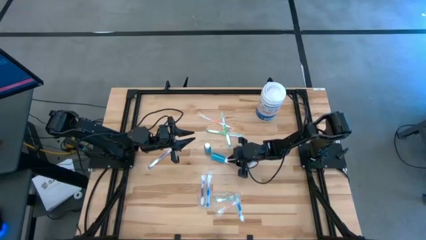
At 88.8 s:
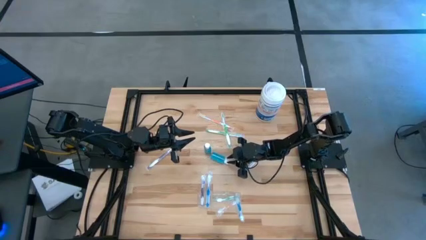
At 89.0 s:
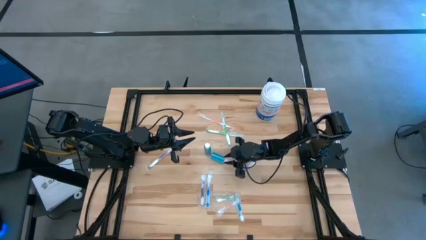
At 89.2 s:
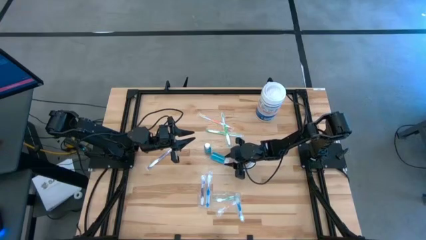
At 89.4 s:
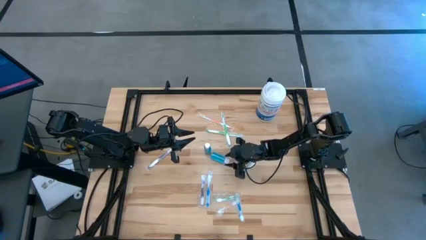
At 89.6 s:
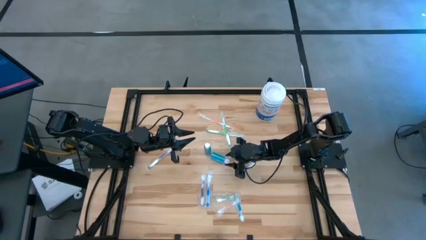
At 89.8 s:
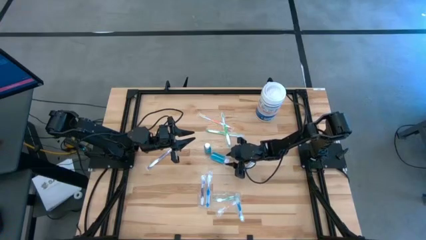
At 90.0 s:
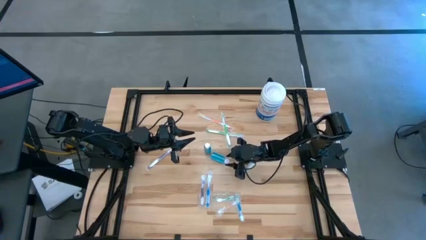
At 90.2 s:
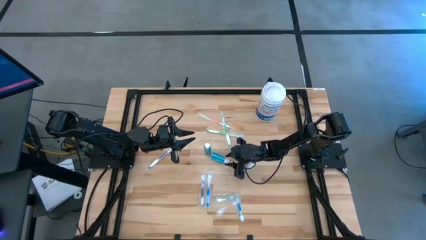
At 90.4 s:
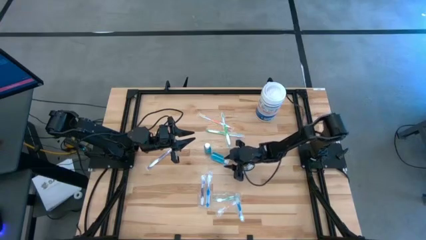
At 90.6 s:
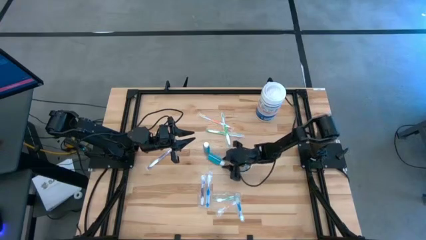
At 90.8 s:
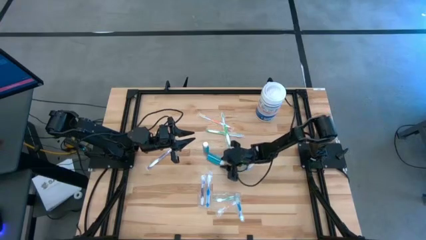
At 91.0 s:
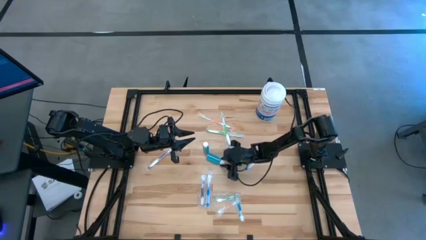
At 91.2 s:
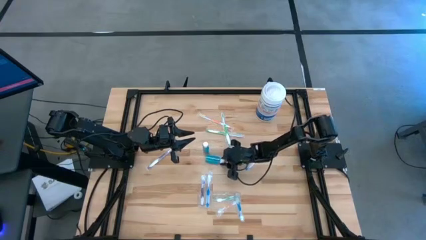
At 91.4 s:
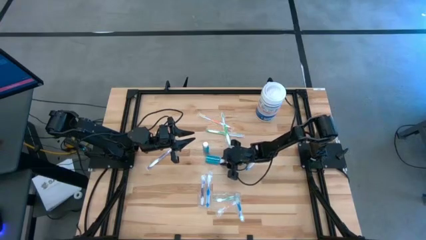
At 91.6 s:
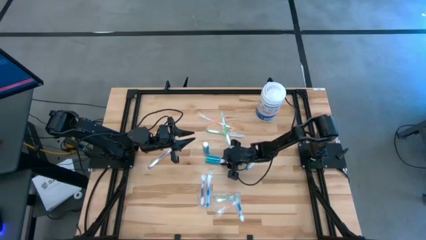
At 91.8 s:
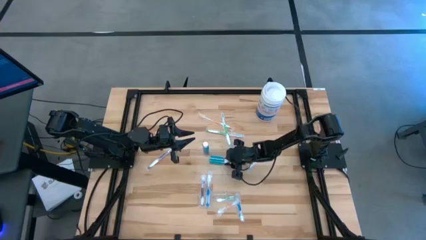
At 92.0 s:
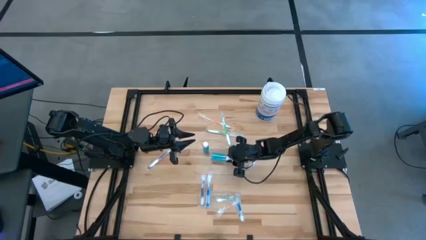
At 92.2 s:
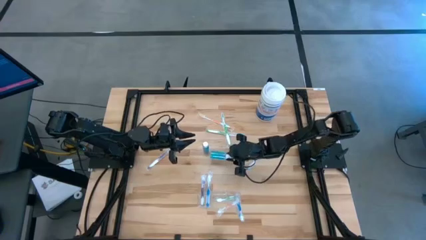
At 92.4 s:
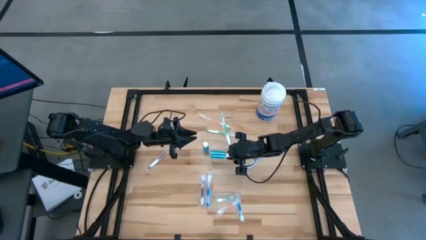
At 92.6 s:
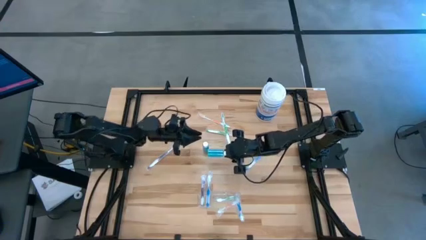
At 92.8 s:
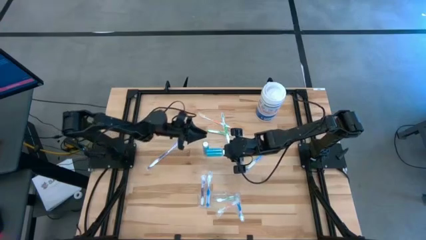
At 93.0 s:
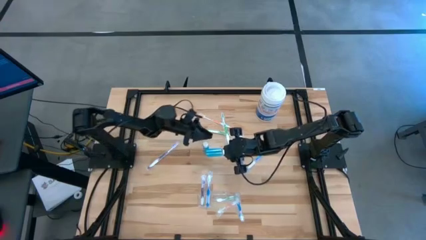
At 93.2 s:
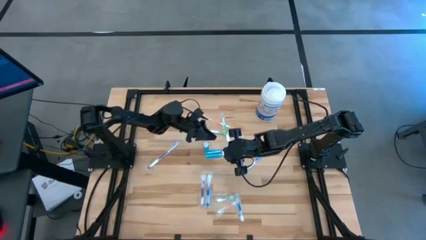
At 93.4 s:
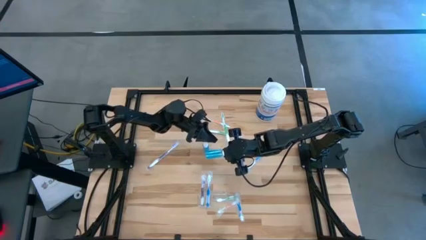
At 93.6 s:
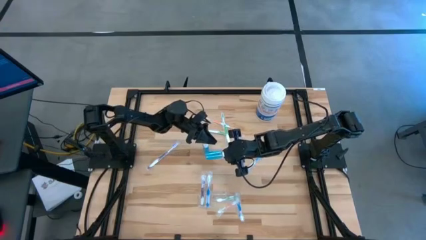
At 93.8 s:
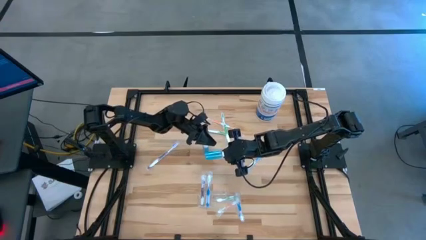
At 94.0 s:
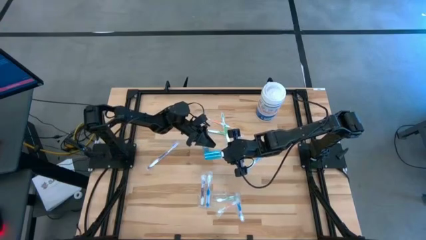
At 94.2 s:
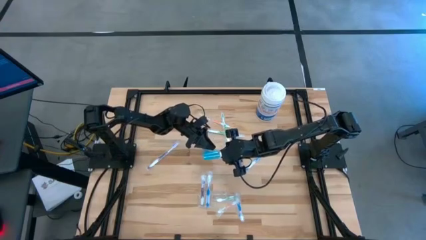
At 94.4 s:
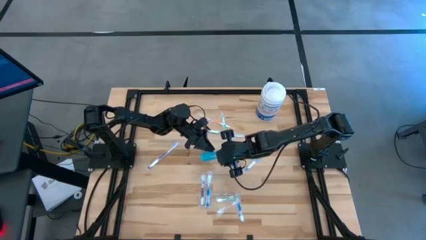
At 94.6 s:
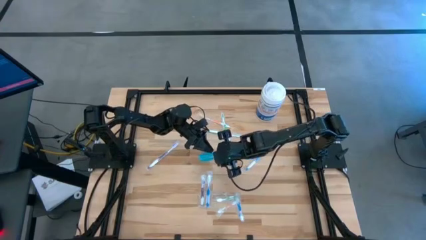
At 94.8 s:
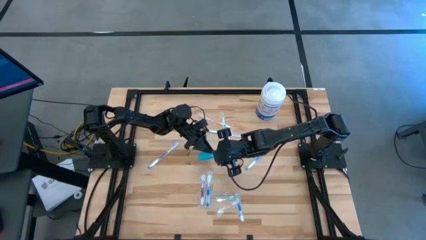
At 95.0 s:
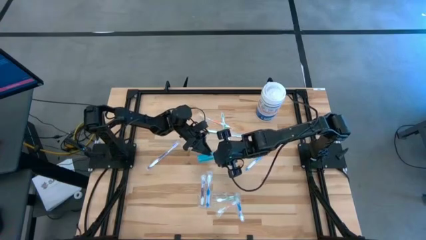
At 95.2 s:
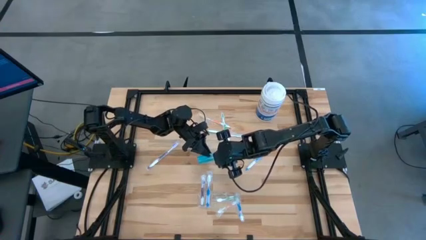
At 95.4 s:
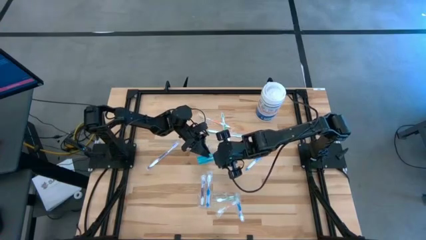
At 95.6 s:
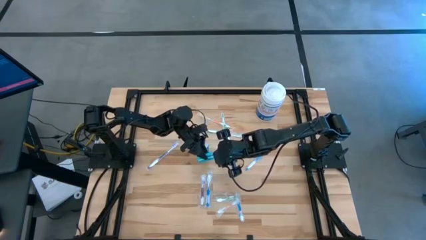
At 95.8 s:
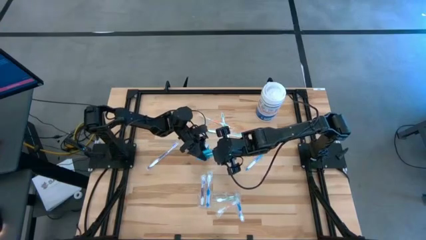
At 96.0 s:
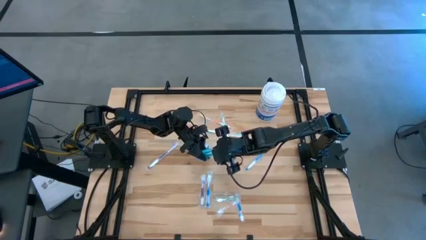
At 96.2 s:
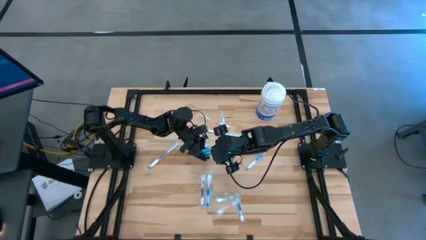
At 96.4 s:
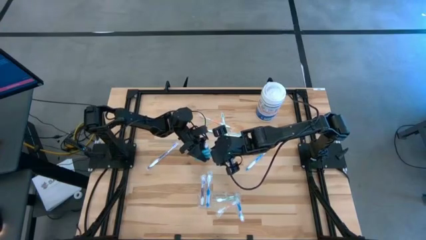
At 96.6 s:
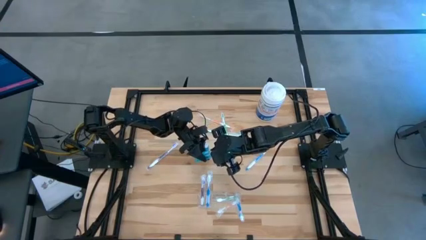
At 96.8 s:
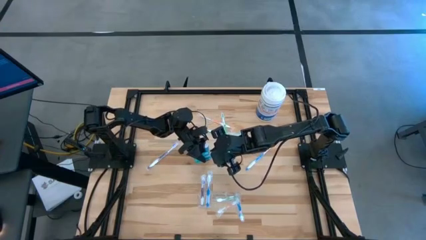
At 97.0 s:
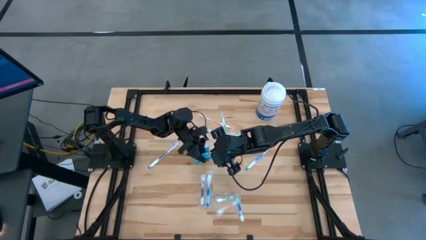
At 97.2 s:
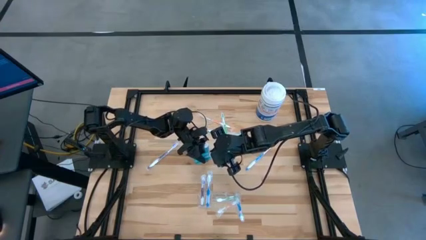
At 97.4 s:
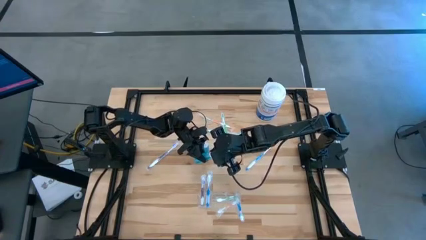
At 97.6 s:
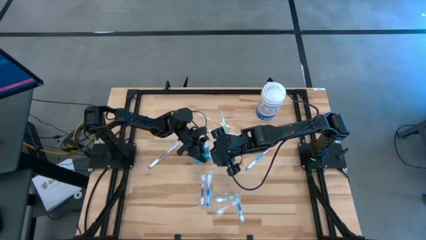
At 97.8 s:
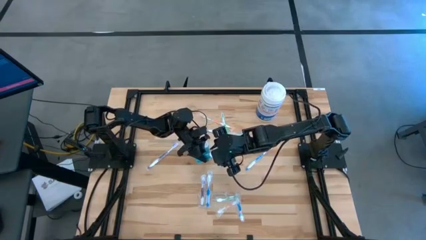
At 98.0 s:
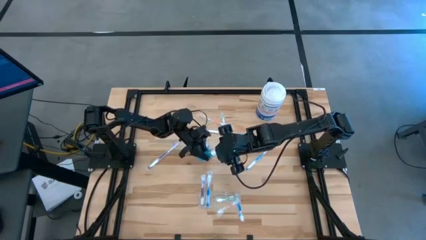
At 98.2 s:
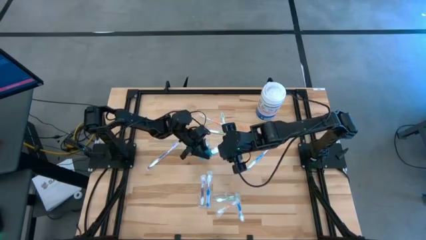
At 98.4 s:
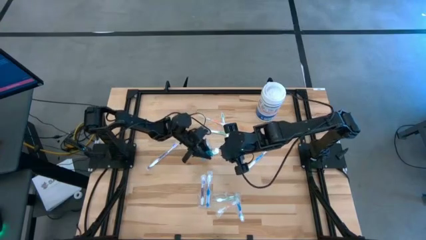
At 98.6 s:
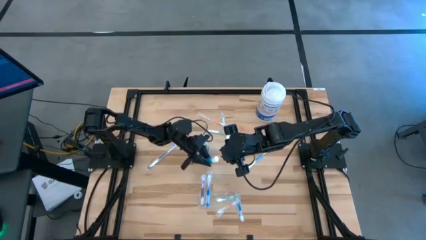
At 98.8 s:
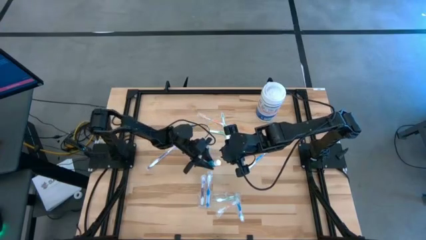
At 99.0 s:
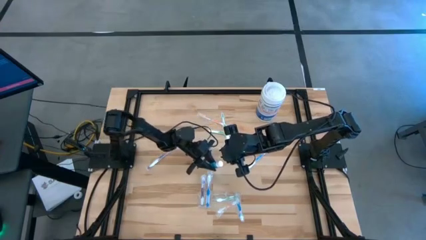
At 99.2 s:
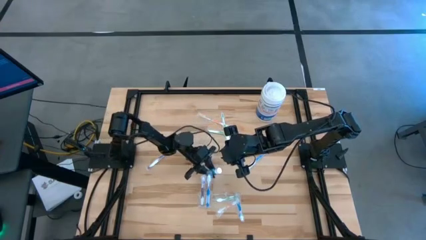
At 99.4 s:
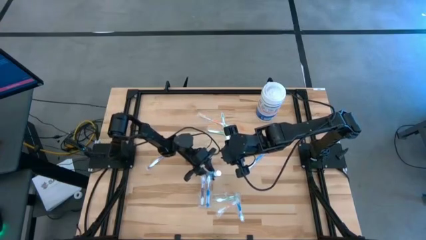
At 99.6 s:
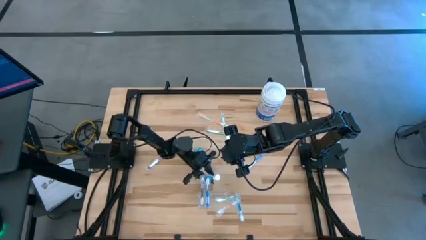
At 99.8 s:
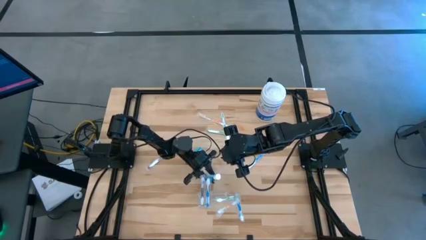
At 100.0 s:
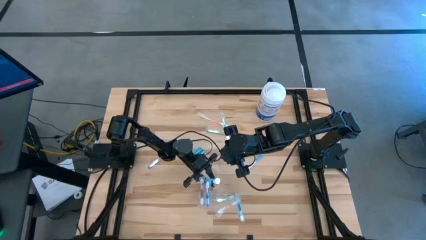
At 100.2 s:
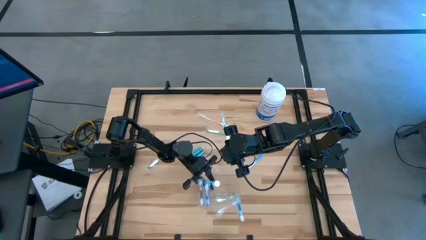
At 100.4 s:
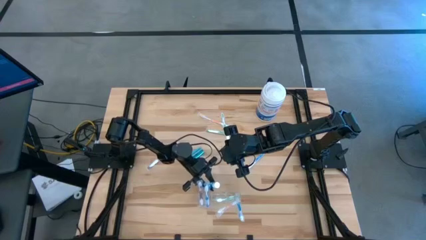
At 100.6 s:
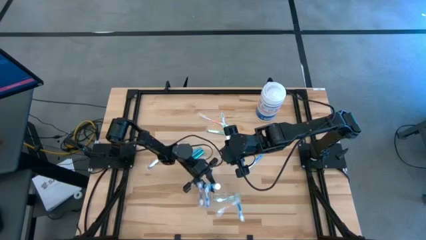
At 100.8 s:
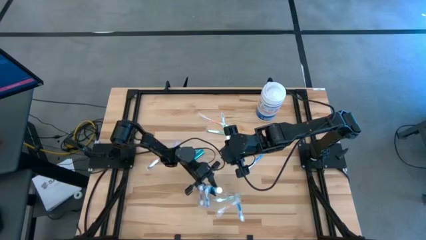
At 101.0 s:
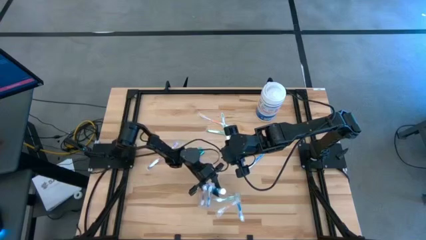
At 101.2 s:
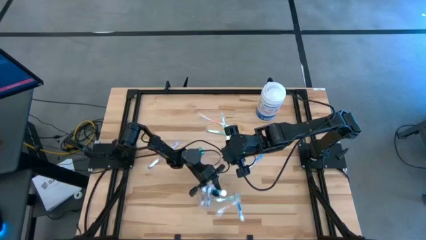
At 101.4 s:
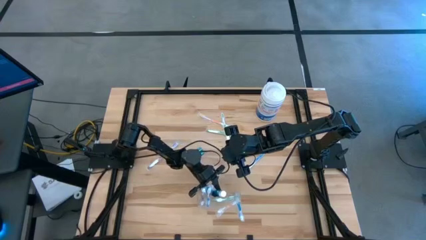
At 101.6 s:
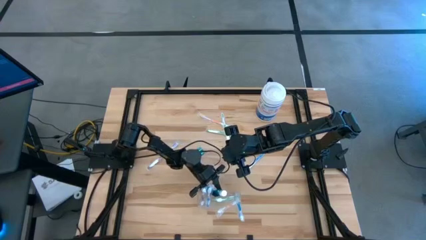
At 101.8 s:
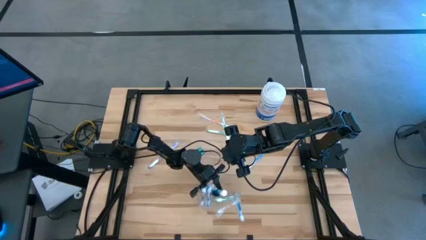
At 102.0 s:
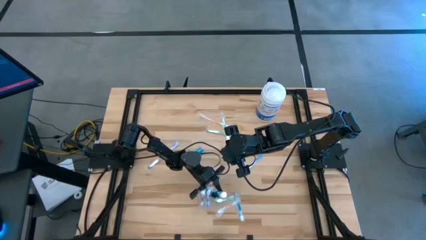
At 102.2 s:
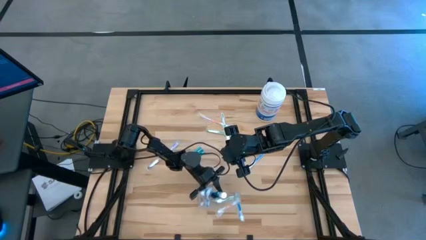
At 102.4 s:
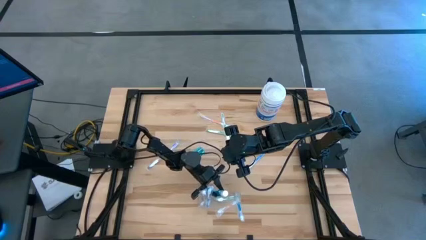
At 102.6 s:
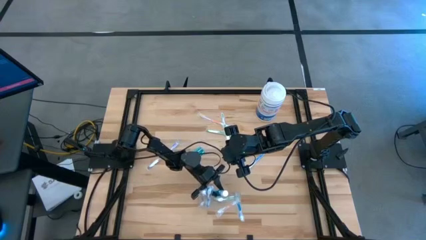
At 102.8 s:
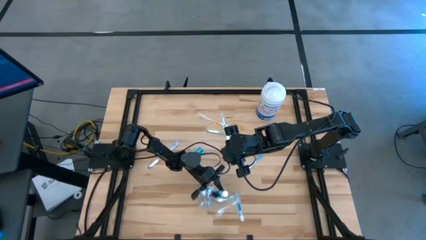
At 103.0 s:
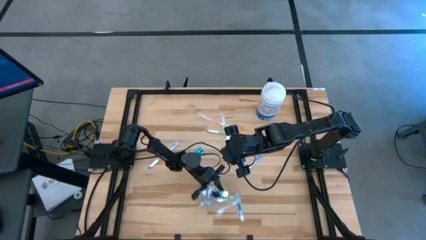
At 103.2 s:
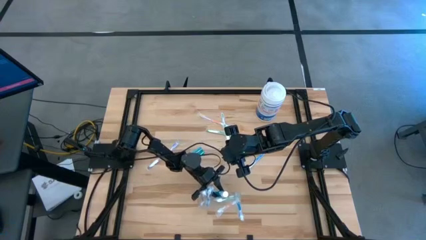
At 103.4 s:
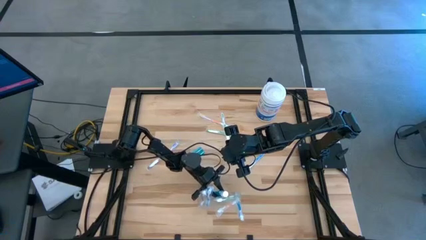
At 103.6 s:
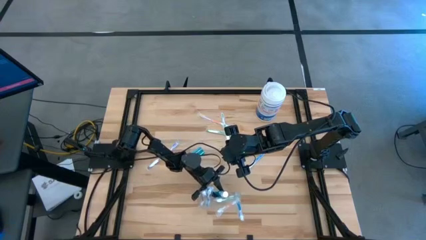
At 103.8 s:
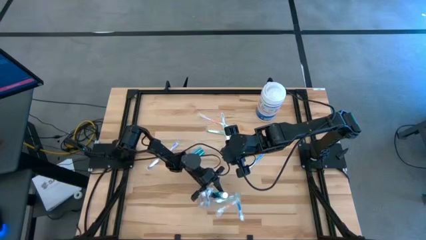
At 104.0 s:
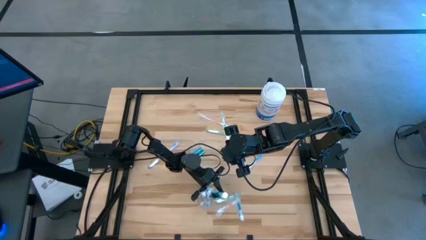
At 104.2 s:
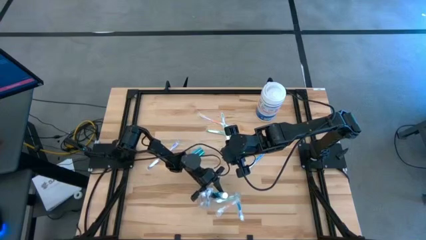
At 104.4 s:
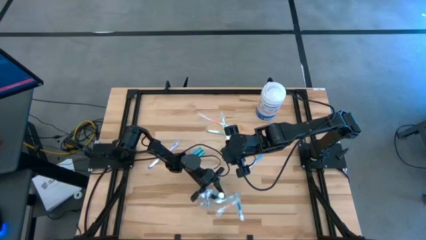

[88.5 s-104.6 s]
Task: Pick & Place toothbrushing station
Put the blue mouthwash bottle into the transparent organizer

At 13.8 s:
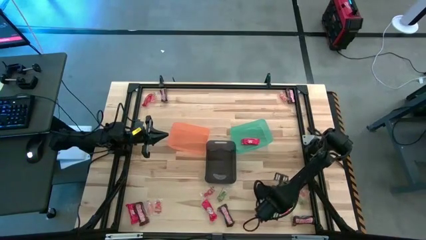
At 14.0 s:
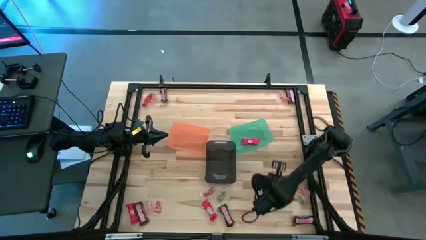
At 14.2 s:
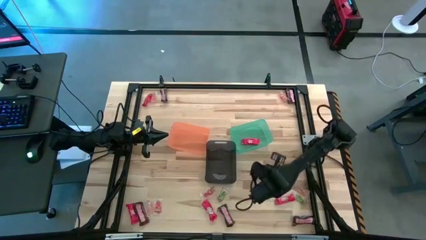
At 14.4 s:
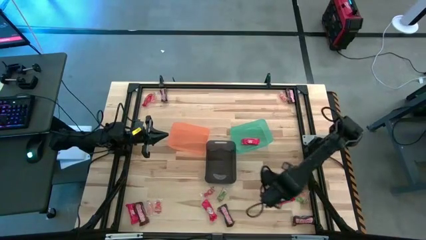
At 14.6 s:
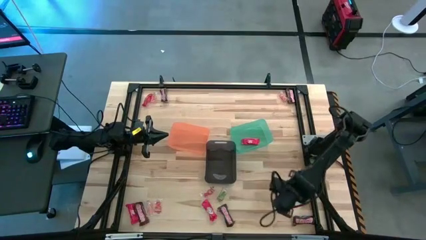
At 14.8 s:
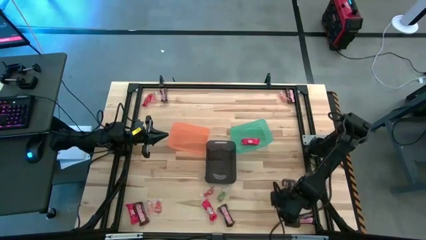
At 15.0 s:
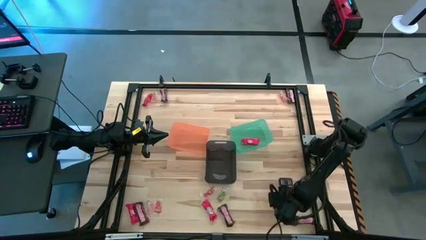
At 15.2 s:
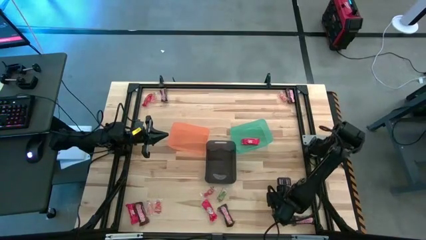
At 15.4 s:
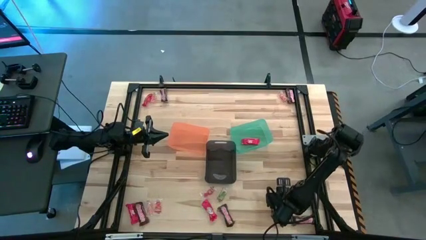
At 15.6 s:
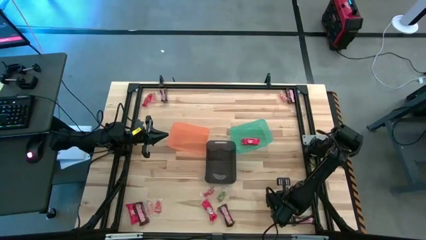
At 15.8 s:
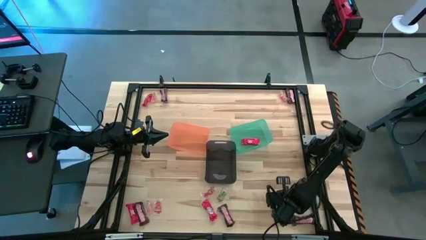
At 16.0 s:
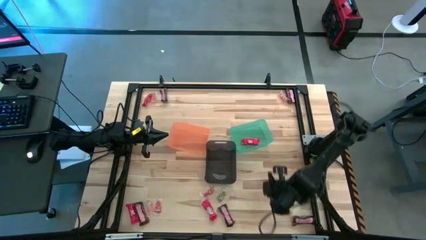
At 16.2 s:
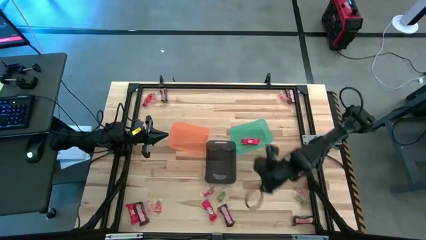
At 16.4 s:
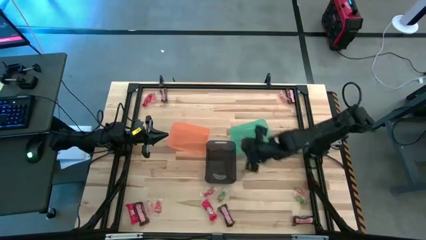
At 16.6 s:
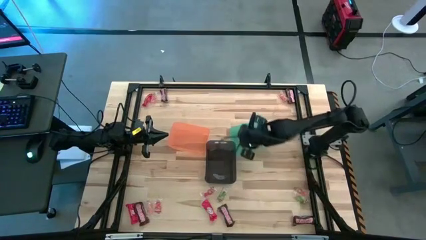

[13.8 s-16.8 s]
Task: Sort candy by brand, put in halloween buckets
Put the red chocolate bar into the green bin
